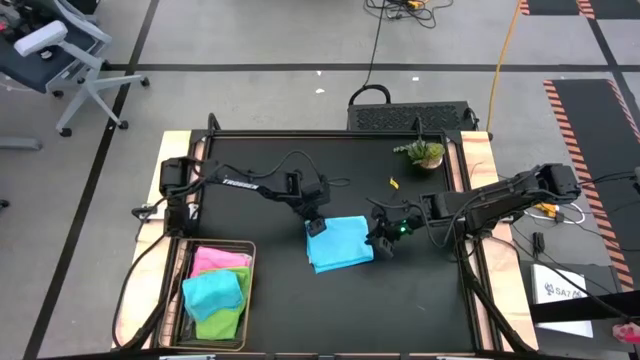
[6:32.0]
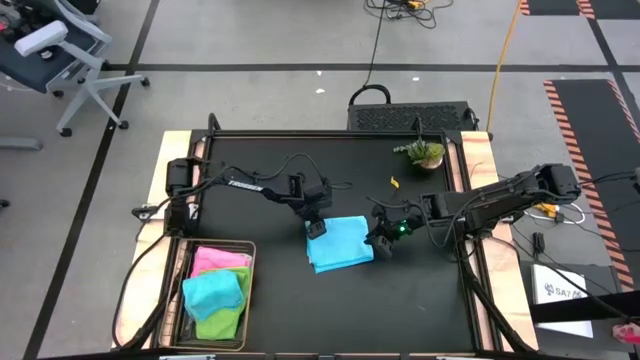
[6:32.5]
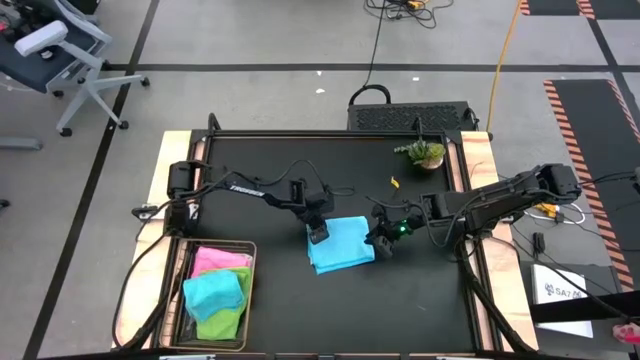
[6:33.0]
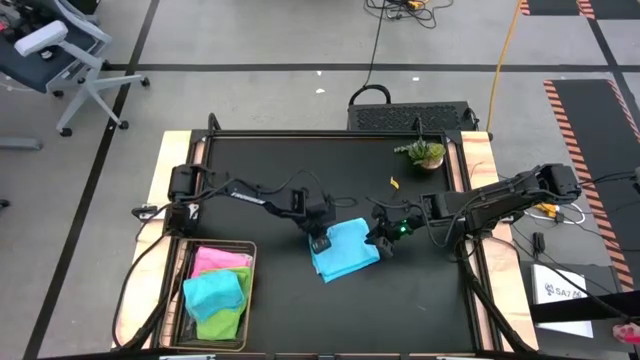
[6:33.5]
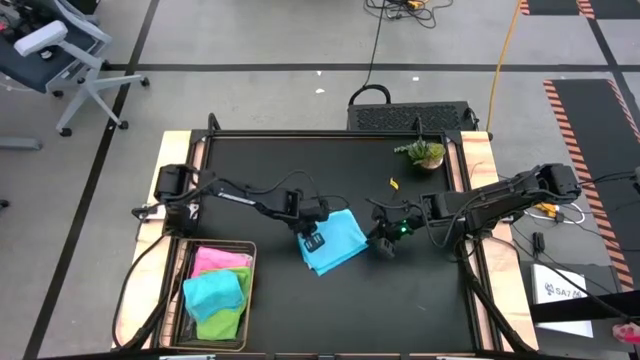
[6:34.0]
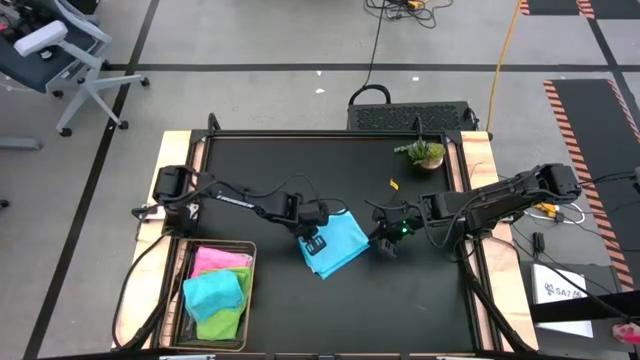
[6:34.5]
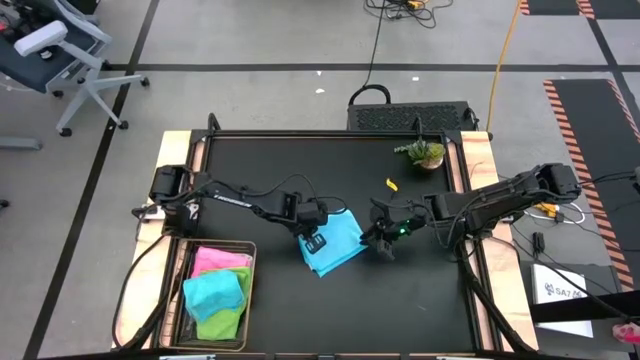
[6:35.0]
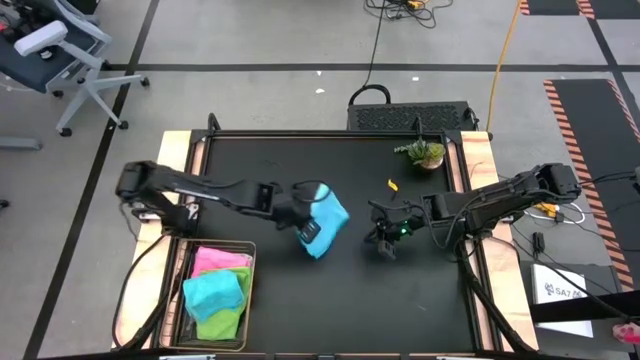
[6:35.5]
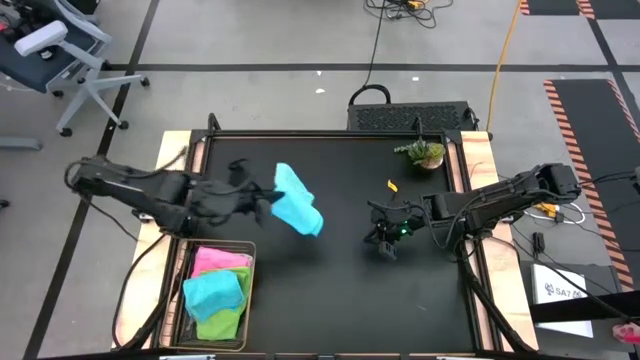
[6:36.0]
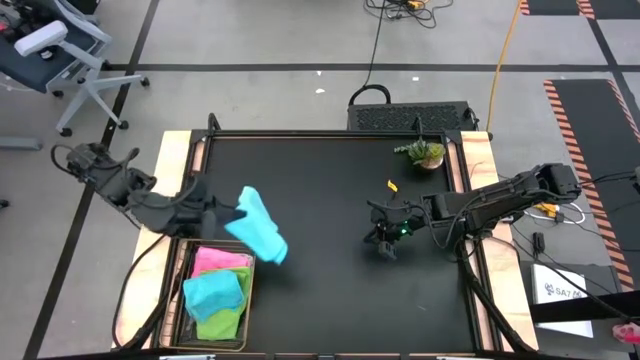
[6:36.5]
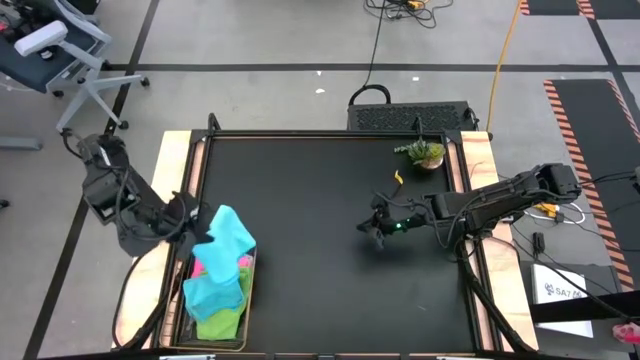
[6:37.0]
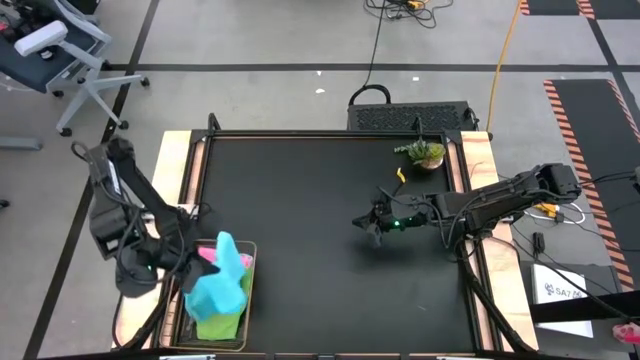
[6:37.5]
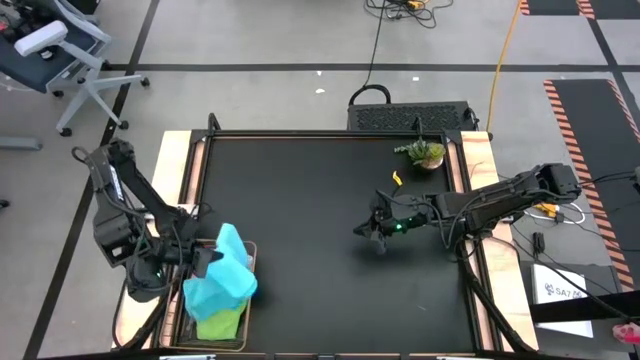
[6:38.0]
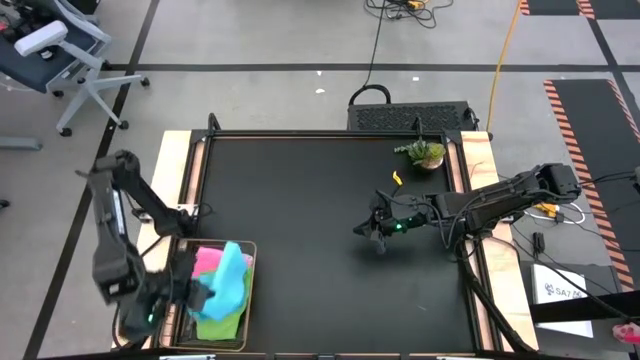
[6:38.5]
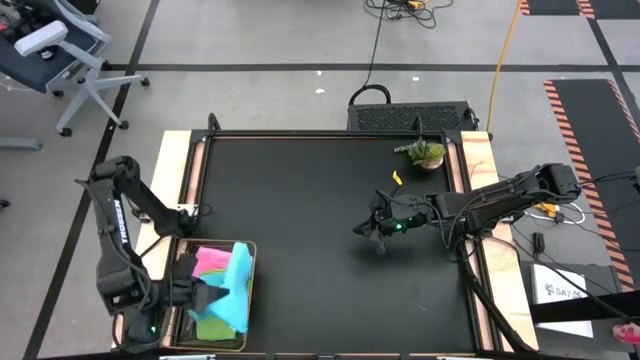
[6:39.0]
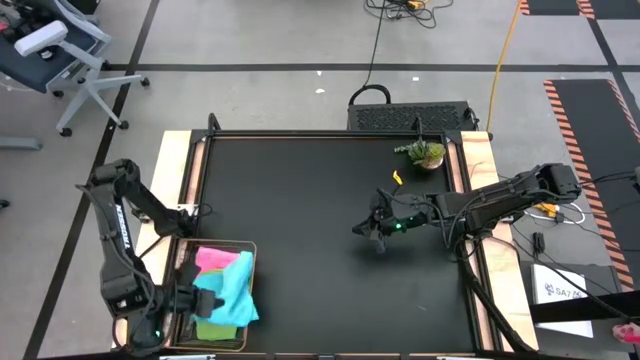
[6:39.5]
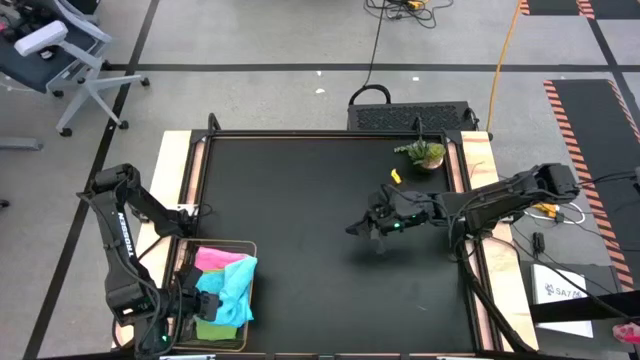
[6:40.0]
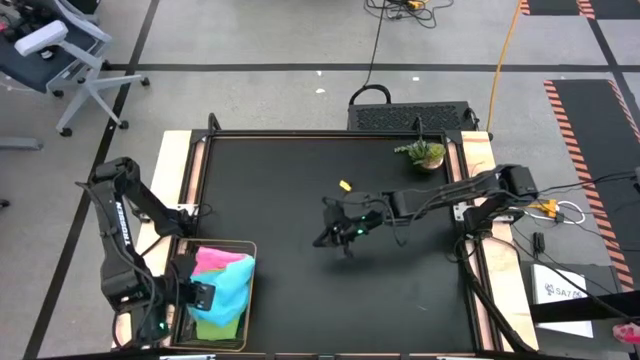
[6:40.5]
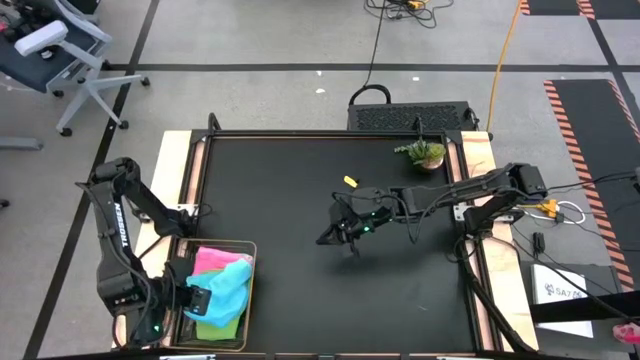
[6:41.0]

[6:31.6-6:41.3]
Task: Fold microfiber towels
Put the folded blue microfiber cloth into the wire basket

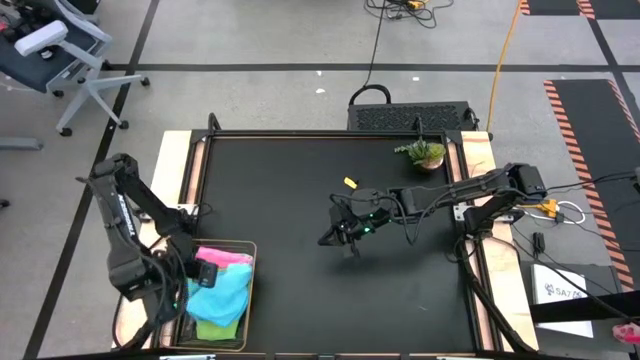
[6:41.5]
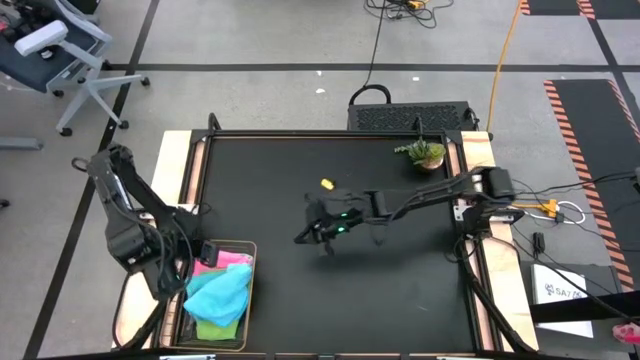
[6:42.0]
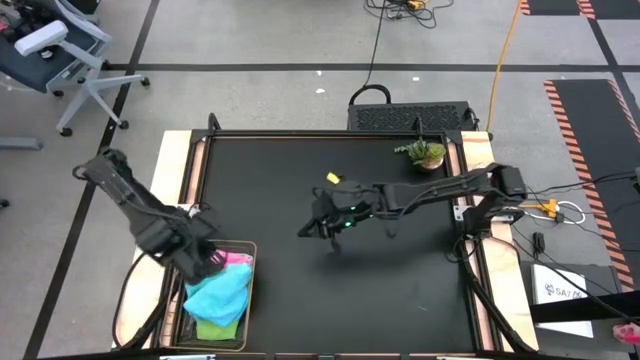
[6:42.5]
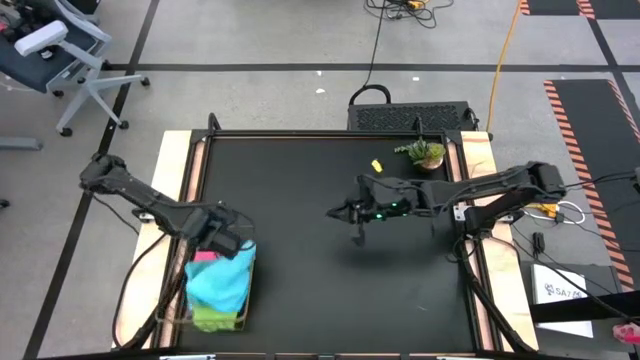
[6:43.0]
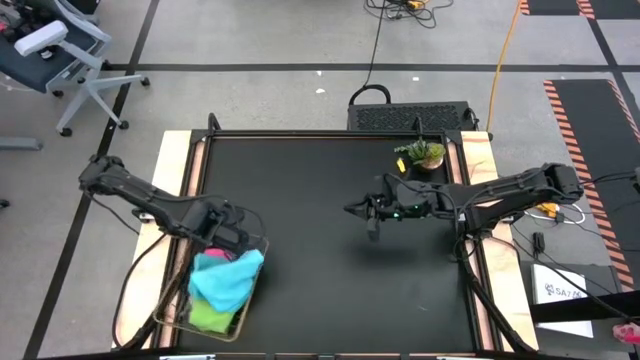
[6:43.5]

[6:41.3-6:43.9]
Move the wire basket to the center

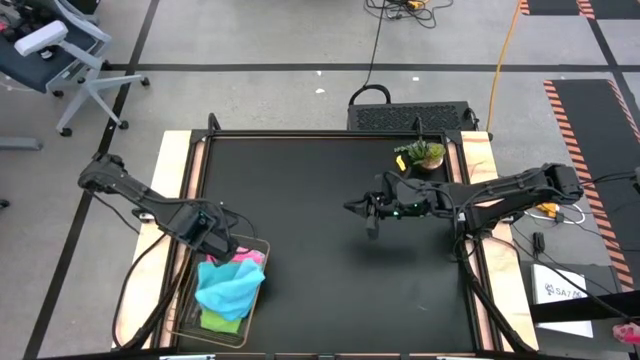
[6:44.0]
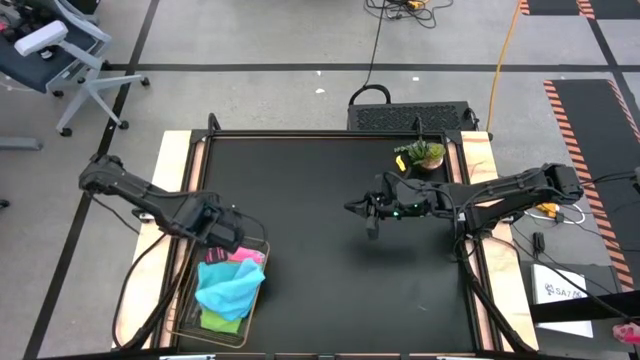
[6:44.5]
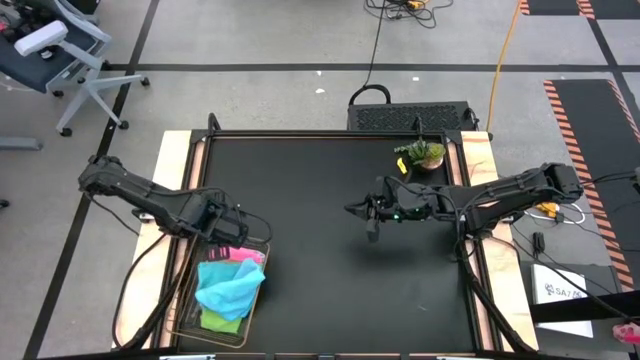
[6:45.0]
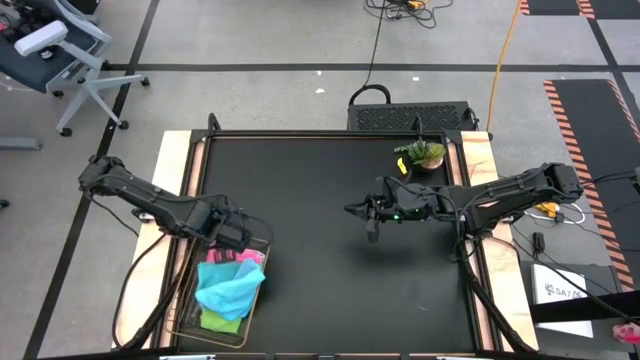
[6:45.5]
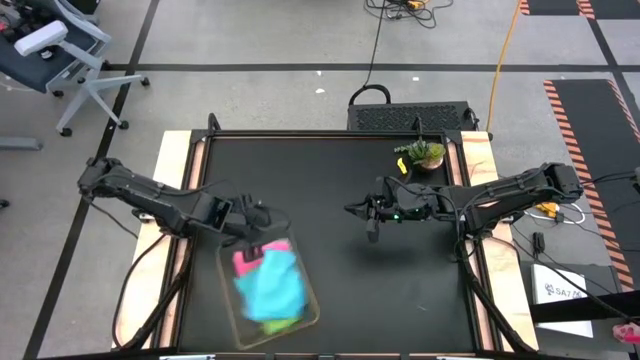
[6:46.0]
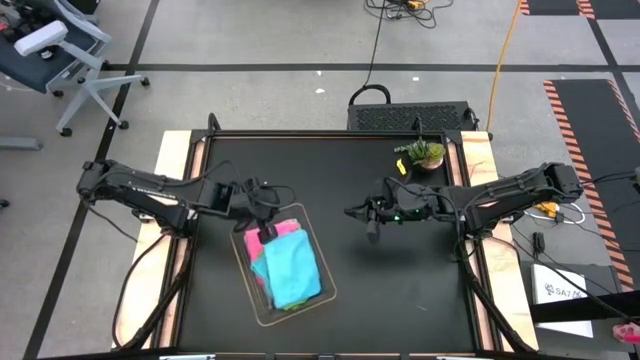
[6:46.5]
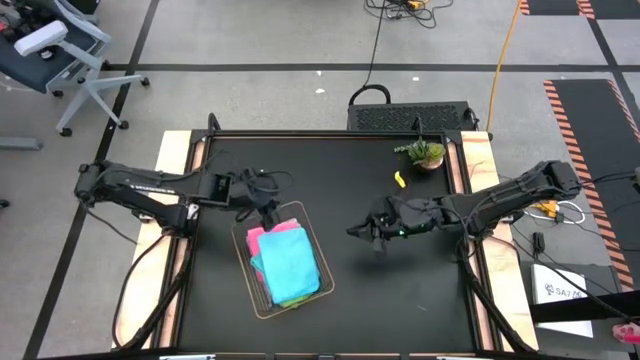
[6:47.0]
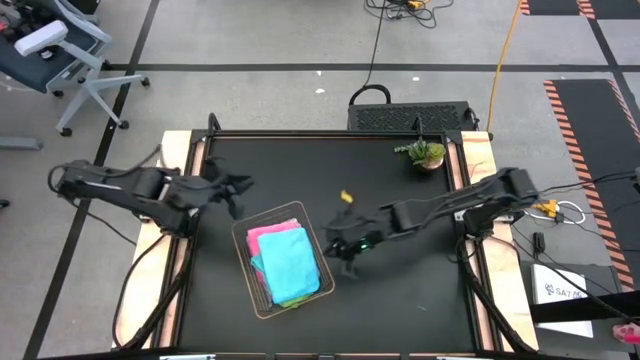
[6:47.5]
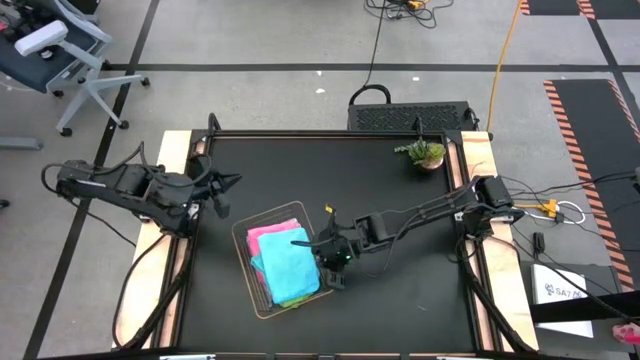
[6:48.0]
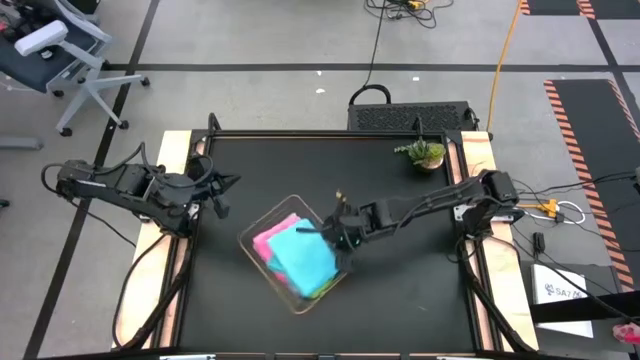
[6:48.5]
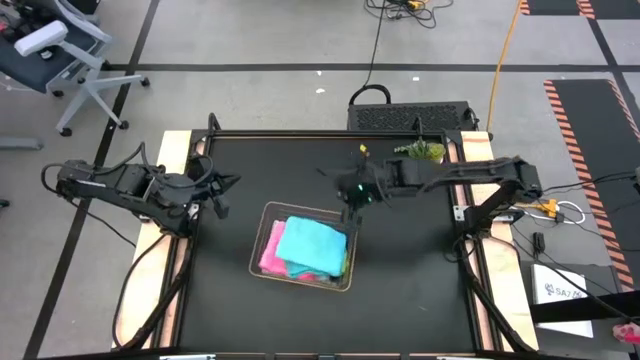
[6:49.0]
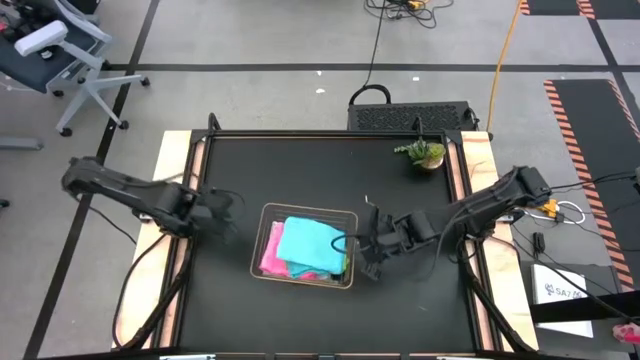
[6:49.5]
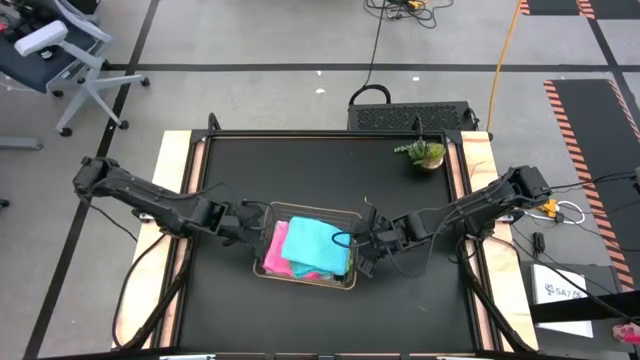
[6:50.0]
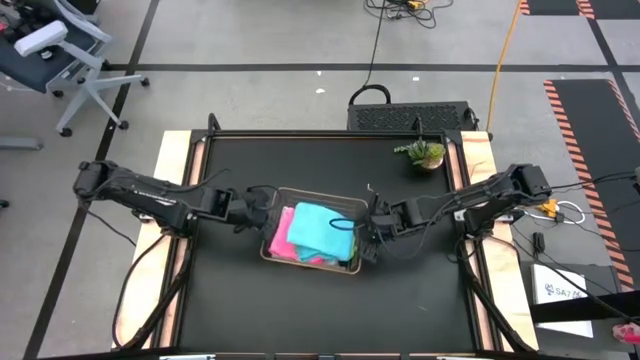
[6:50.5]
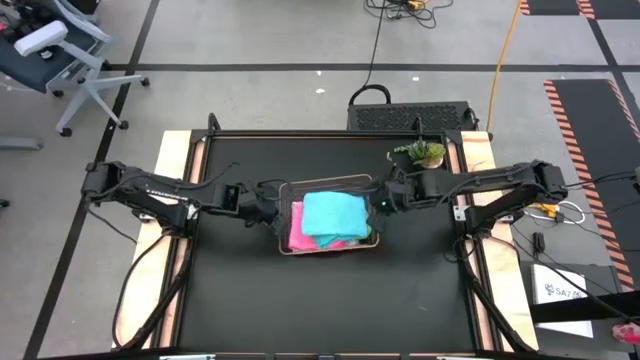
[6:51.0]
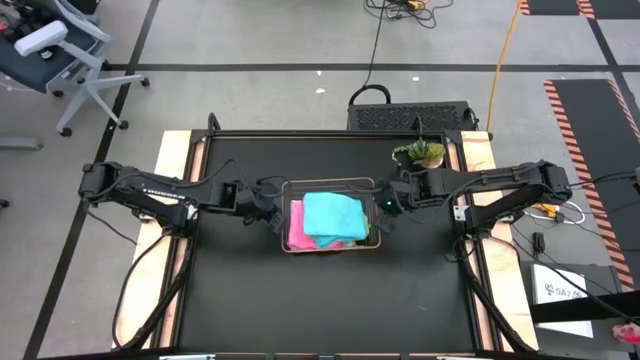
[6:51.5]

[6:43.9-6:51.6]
Move the wire basket to the center

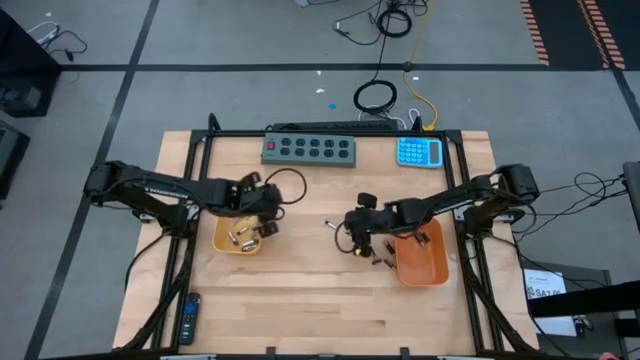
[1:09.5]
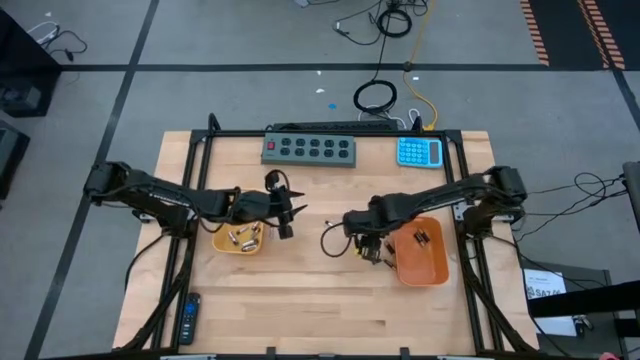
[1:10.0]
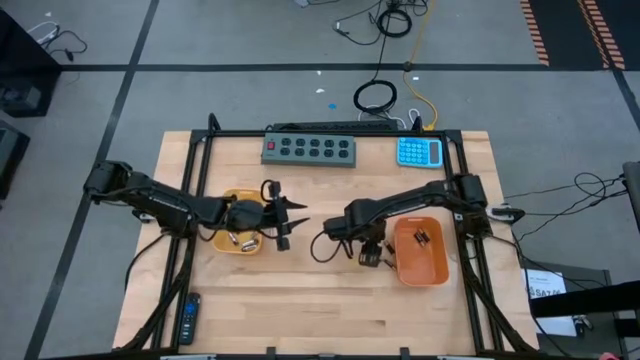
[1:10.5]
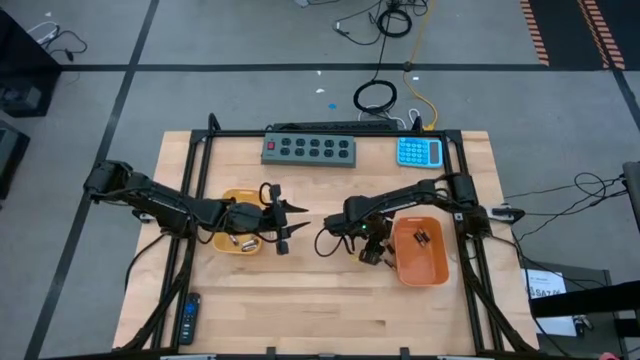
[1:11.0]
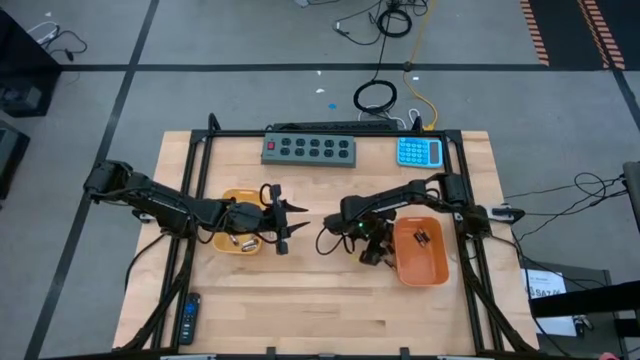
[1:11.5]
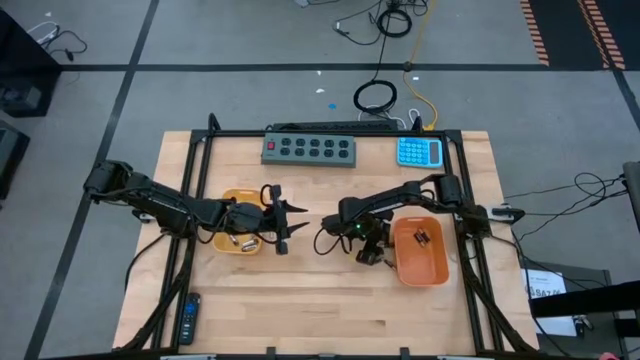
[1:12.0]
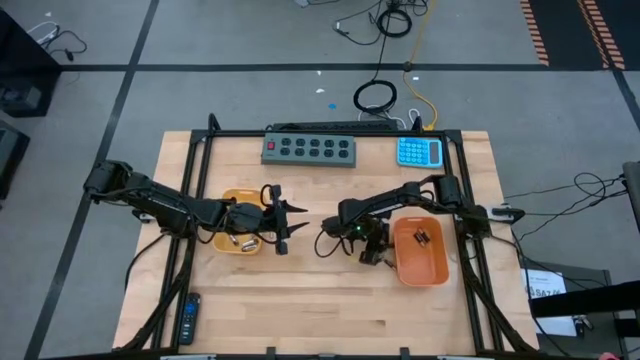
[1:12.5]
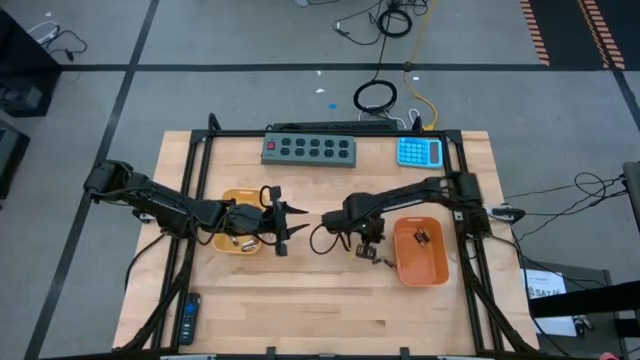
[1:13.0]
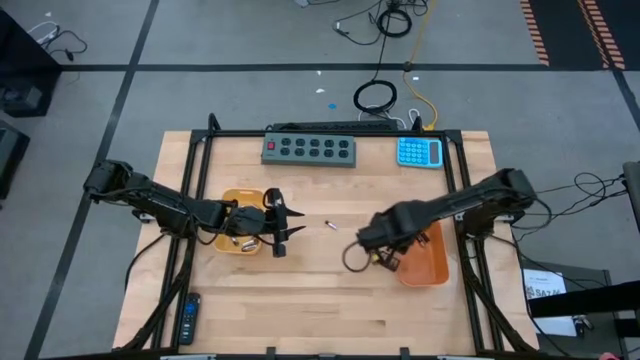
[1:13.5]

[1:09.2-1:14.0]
Task: Sort batteries
Put the black battery into the orange bin
